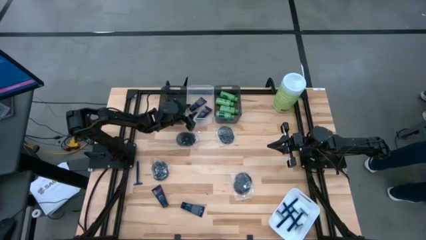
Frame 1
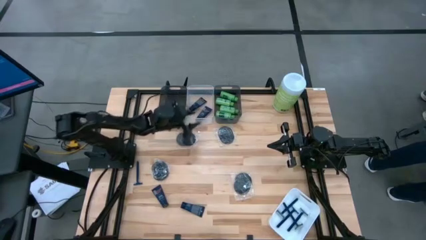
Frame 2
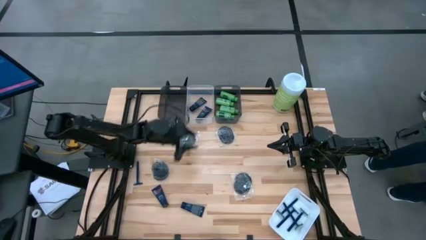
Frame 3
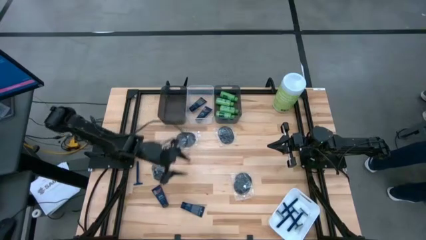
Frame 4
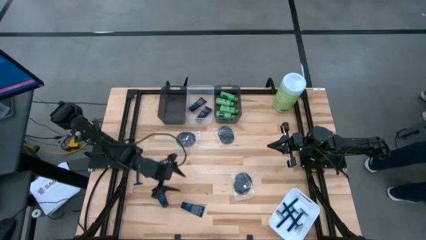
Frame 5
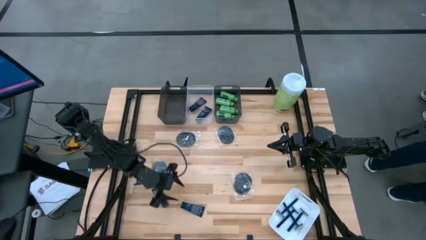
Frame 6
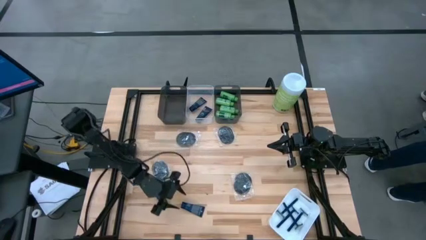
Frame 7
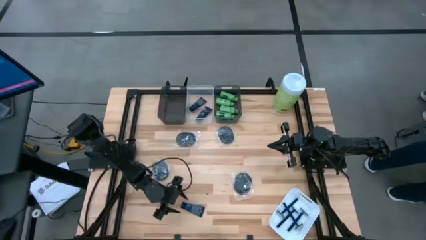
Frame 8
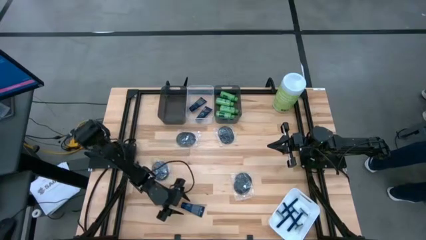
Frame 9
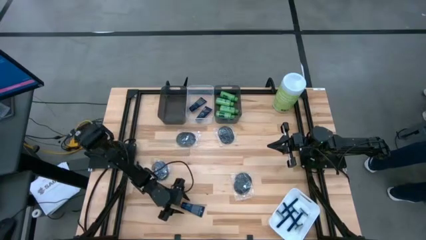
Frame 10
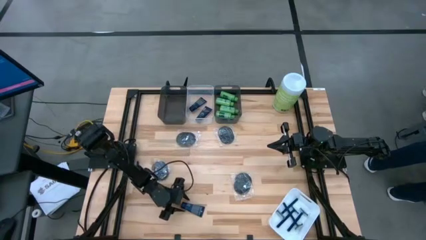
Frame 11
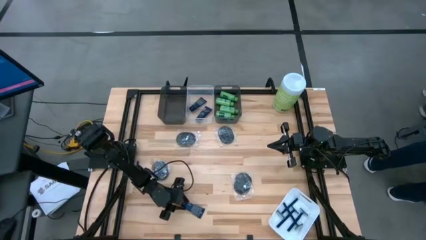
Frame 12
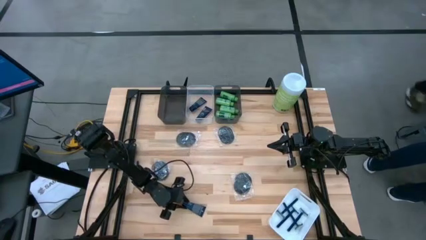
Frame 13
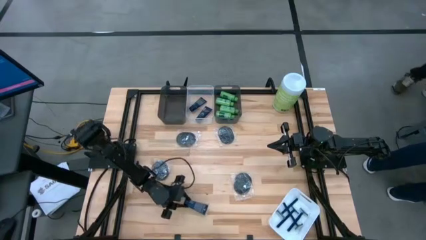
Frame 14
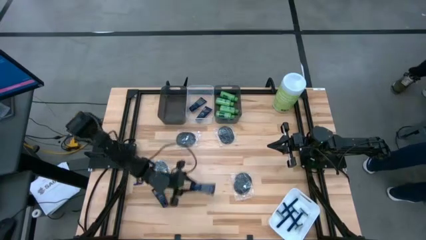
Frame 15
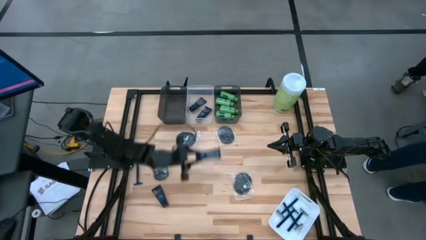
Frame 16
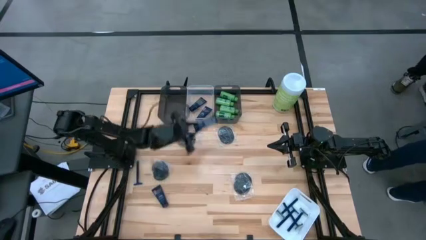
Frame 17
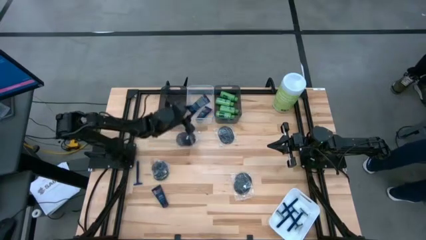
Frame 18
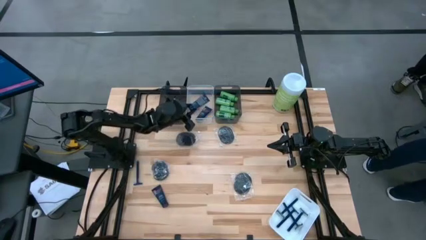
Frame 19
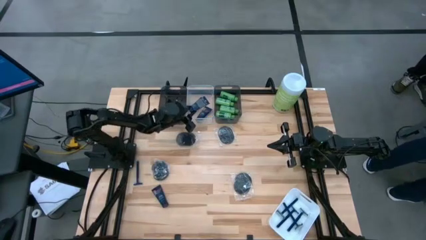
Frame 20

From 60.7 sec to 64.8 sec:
Task: Pick & Place Travel size toiletries
Put the blue shave cream into the transparent bin

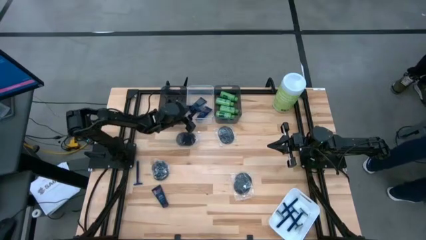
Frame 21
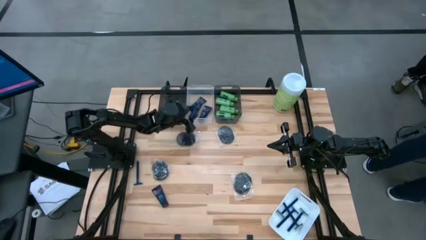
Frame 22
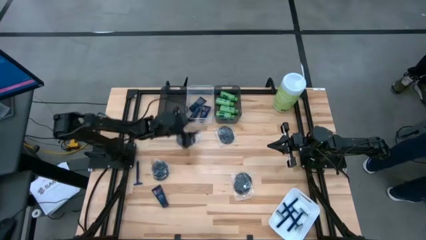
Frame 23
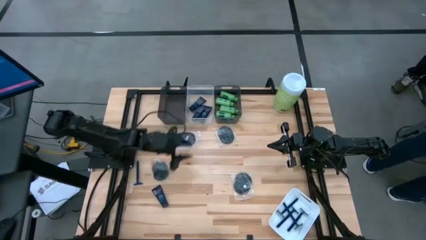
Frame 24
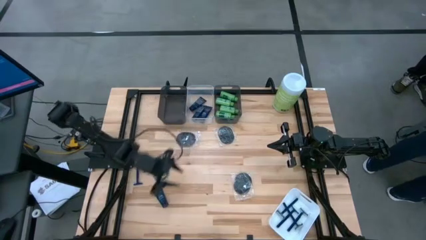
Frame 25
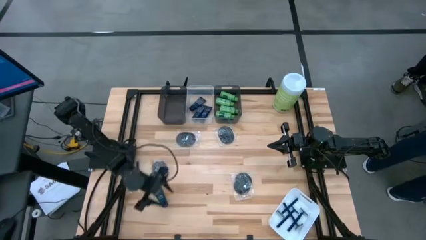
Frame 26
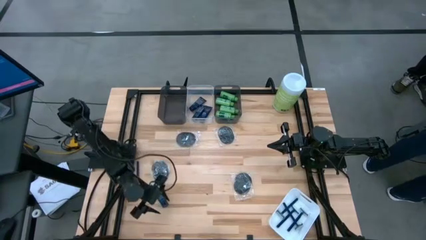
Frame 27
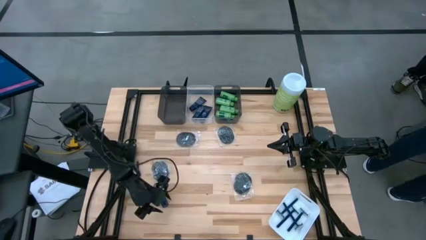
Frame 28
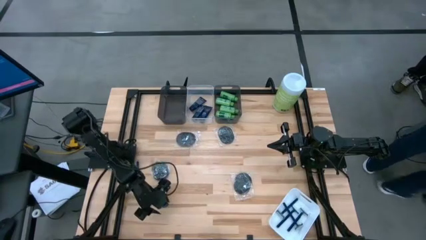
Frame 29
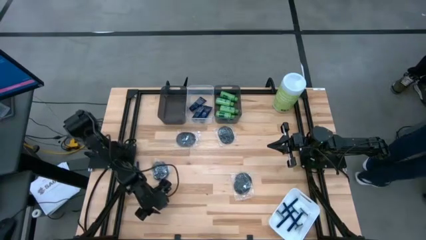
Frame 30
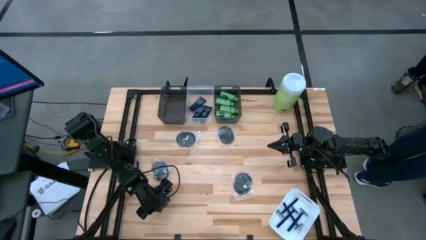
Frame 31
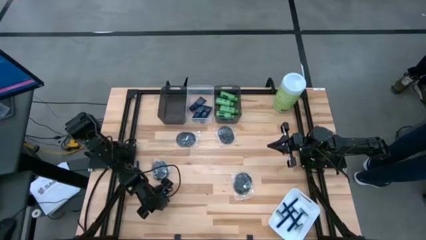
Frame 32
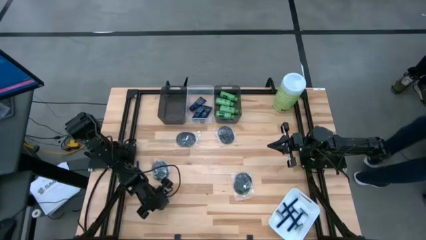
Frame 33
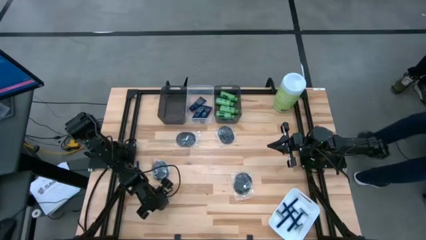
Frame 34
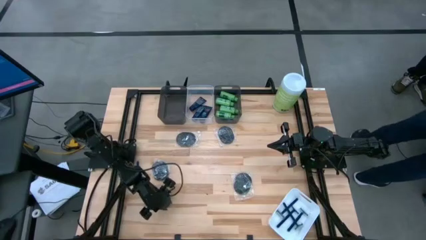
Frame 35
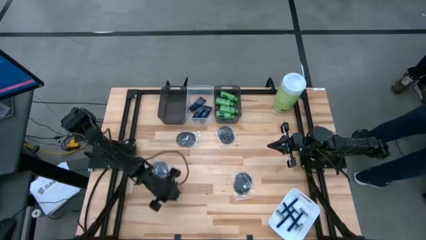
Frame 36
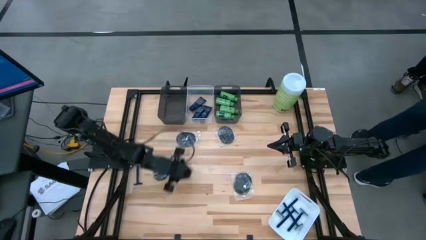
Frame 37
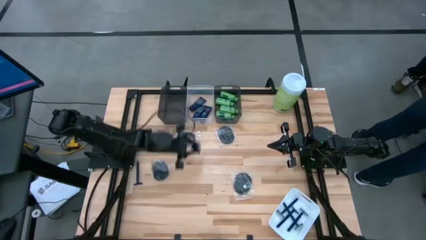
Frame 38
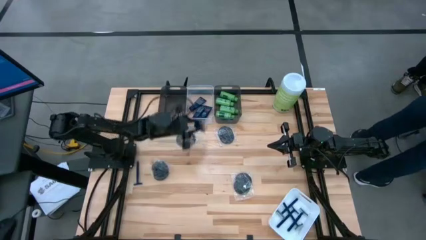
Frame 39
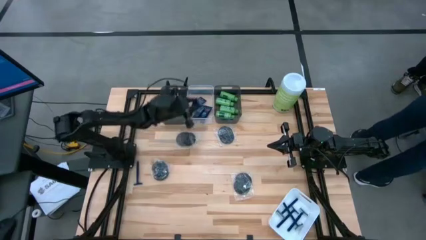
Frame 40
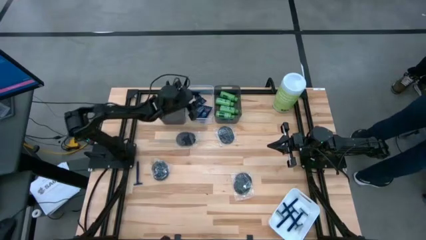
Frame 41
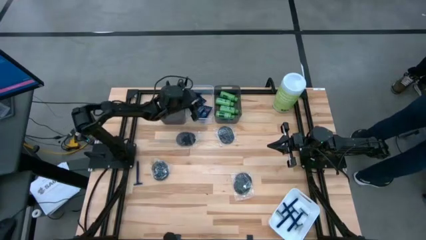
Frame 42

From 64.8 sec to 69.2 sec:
Put the blue shave cream into the transparent bin

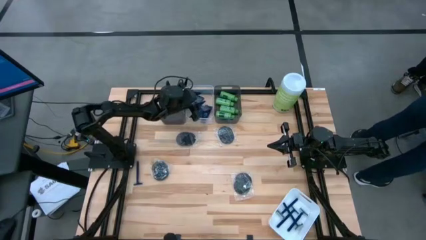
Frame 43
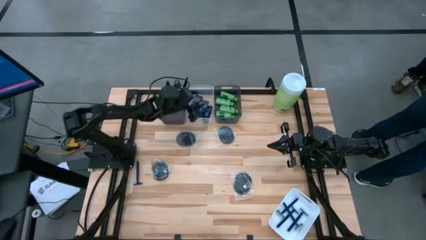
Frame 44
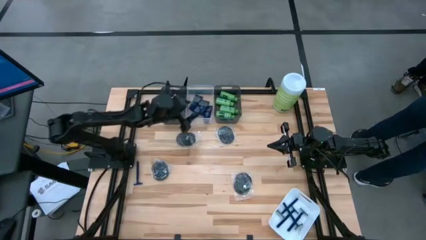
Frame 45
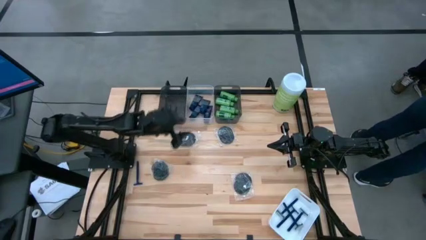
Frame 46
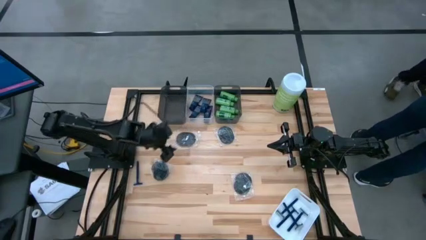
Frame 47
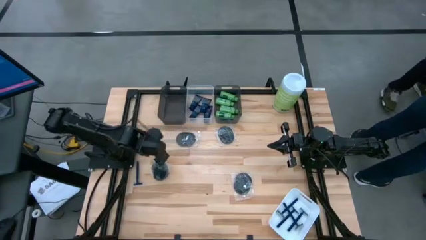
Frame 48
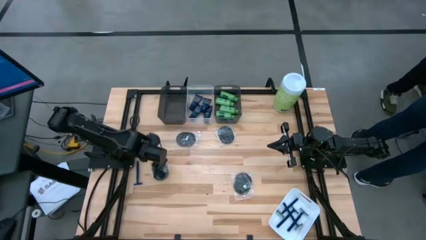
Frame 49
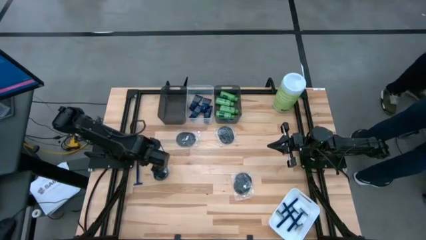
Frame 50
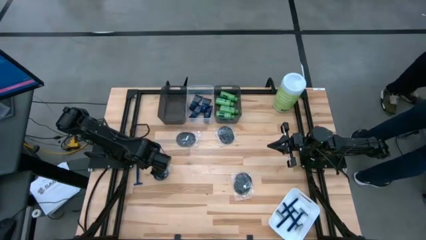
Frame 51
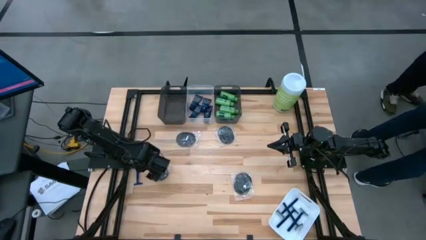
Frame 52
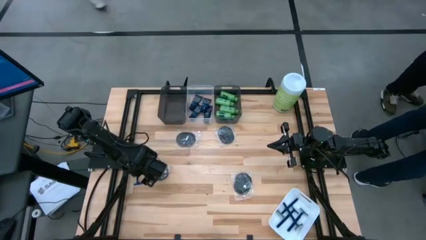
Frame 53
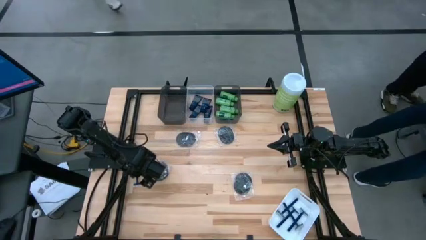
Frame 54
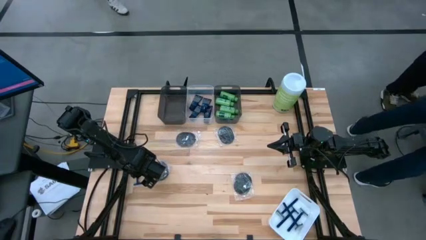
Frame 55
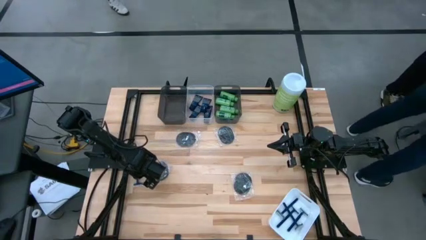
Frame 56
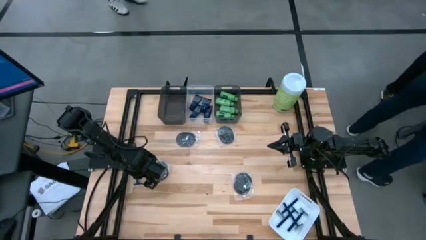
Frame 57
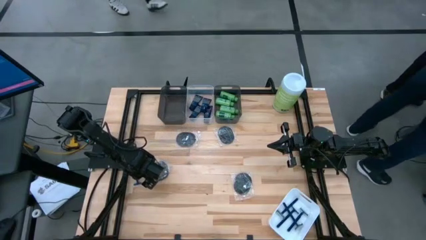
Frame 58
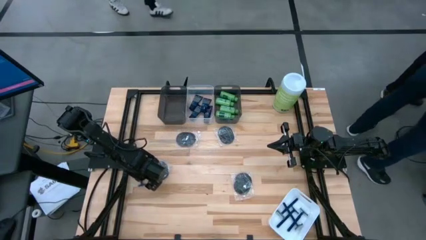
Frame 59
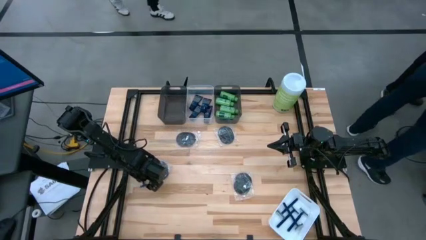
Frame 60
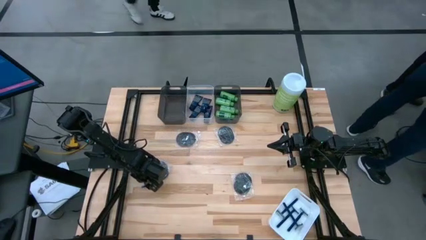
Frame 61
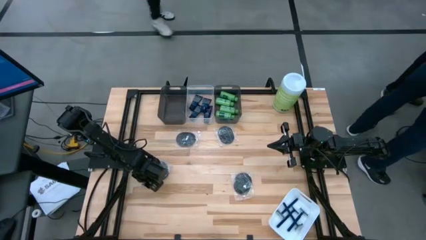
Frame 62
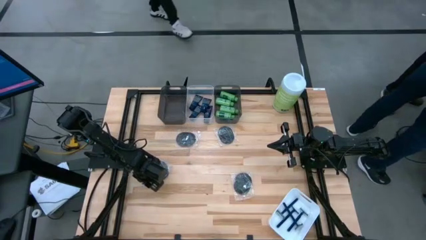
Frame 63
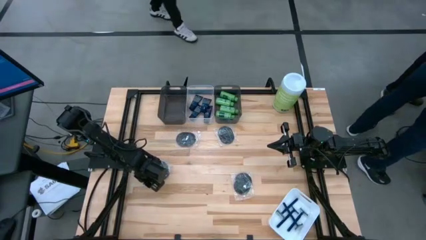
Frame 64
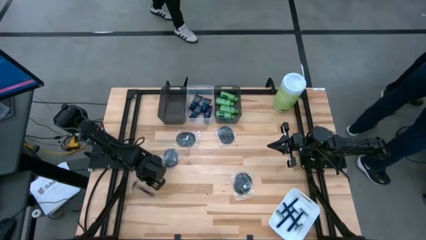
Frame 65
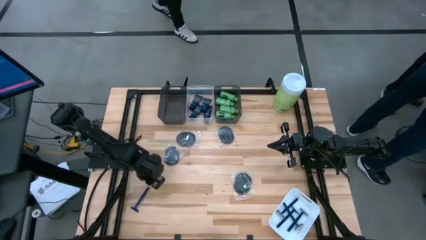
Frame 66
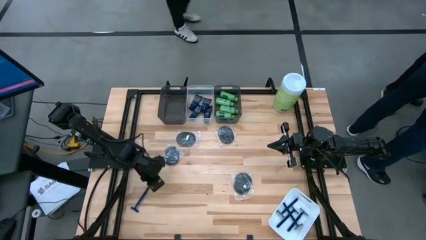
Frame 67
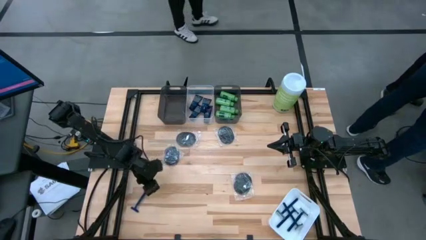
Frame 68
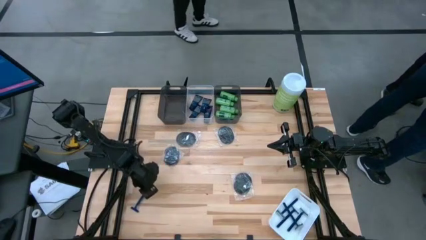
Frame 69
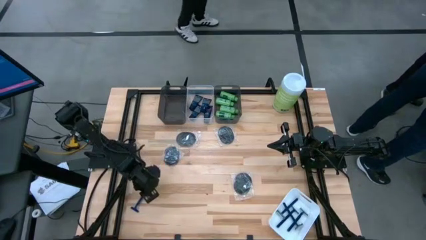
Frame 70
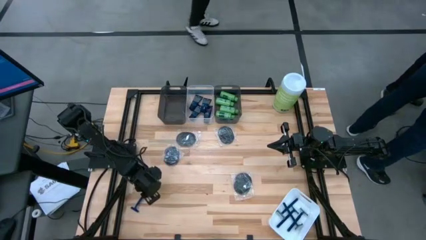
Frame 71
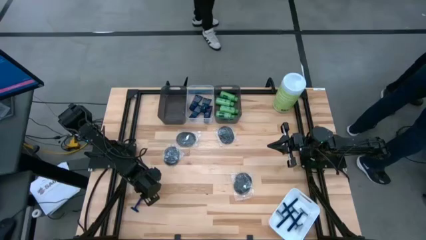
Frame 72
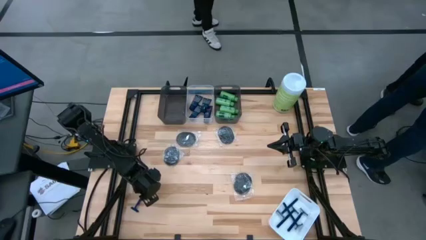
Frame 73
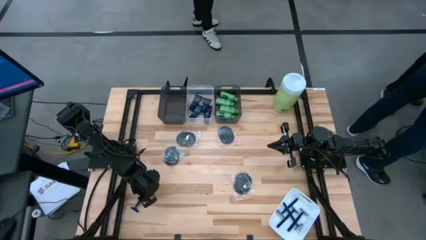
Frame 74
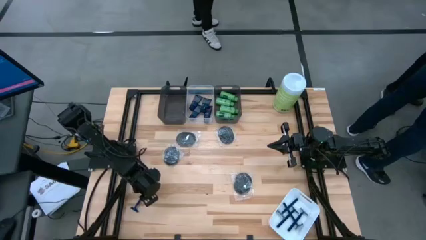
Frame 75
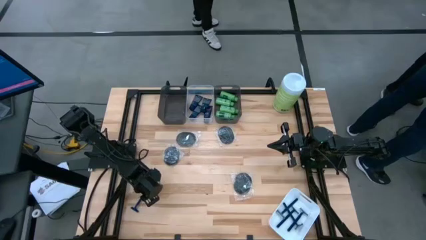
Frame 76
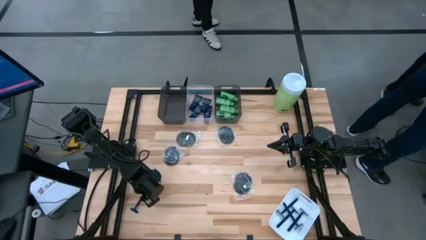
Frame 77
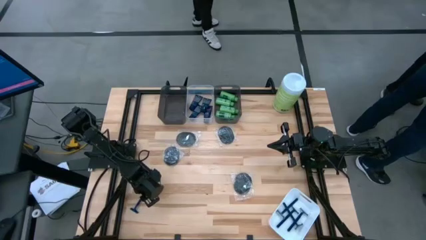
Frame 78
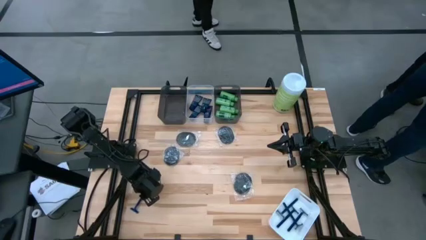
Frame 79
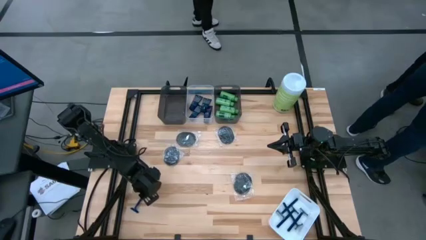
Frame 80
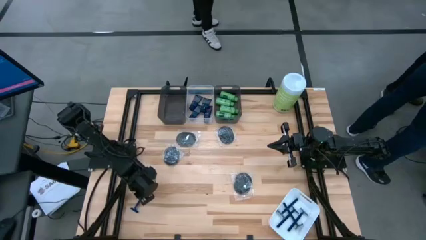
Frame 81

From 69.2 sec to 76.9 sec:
Put the blue razor into the white bin

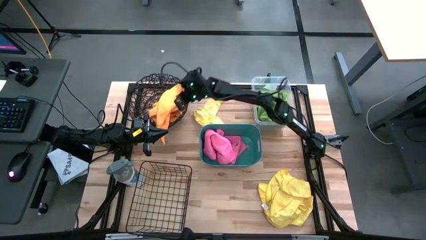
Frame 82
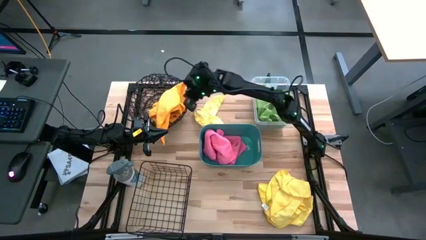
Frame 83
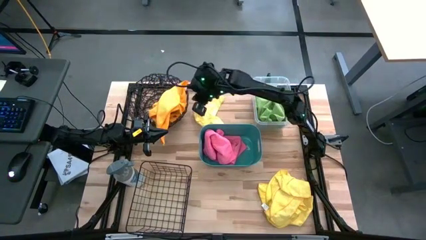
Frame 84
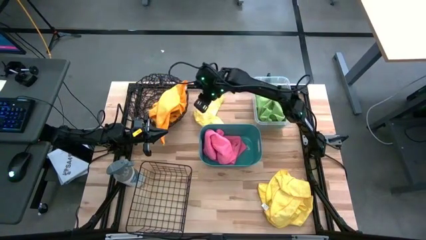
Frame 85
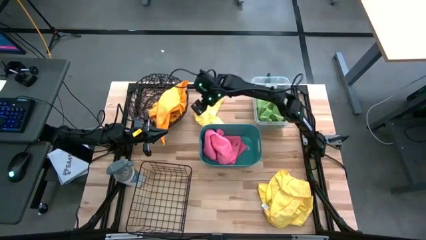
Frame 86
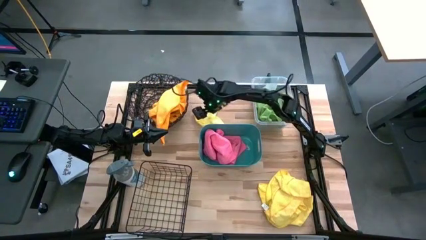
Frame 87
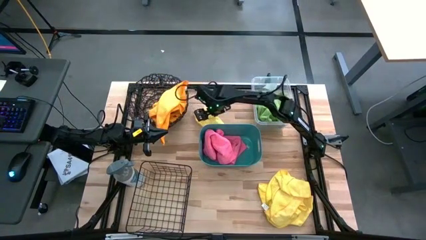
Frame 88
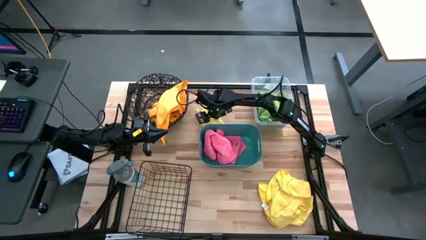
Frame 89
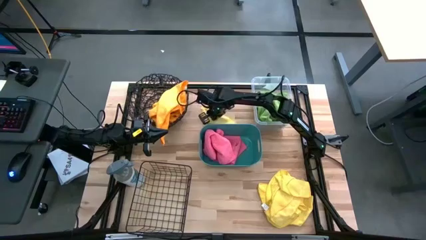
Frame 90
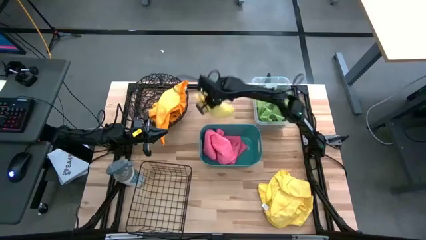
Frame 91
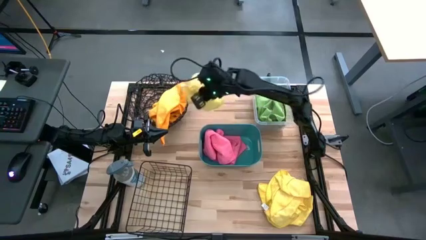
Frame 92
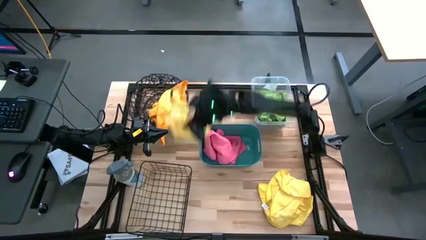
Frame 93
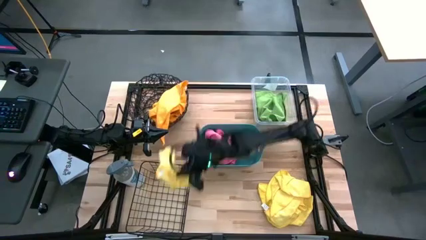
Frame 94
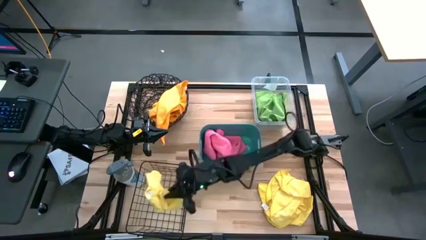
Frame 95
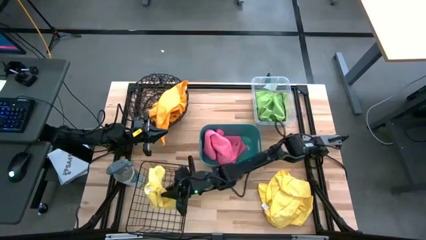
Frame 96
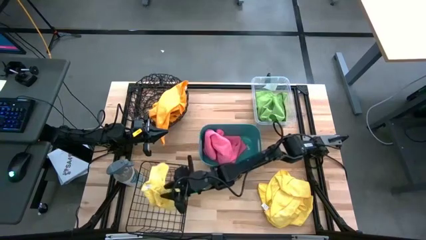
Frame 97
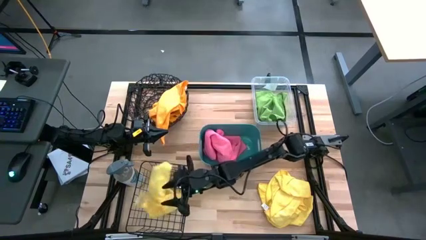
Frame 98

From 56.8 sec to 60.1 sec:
Task: Sort microfiber towel by color & place in baskets
Put the yellow microfiber cloth into the bottom black wire basket
